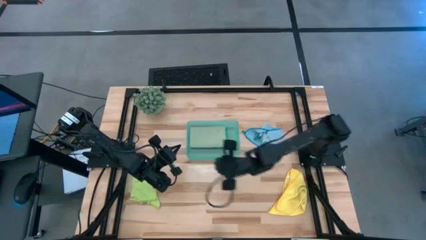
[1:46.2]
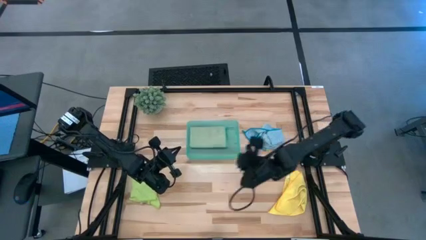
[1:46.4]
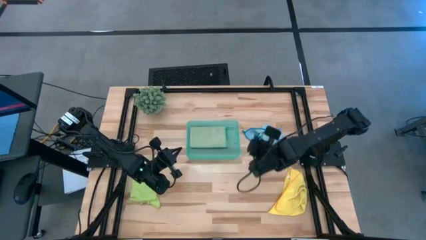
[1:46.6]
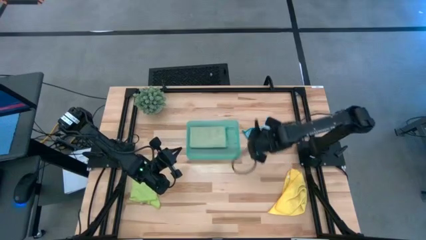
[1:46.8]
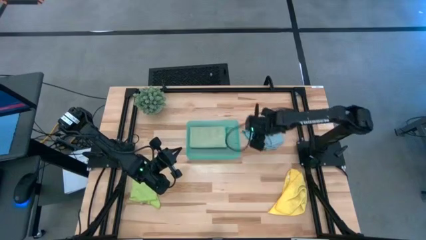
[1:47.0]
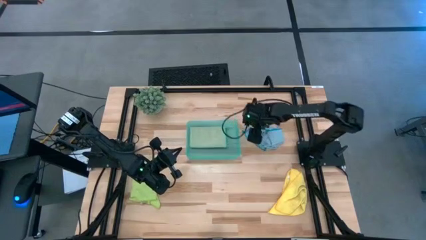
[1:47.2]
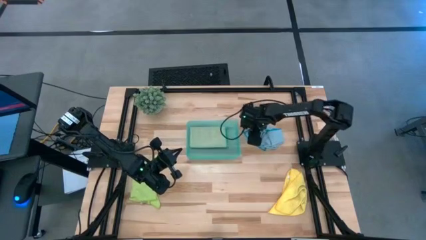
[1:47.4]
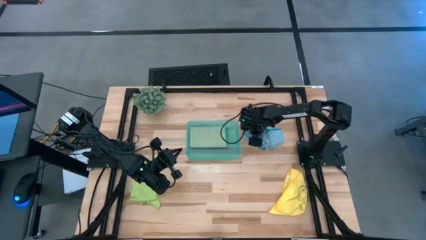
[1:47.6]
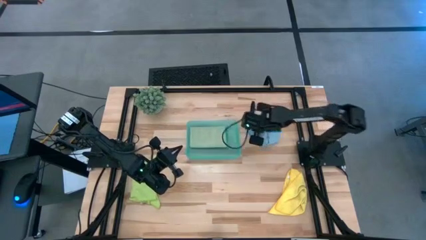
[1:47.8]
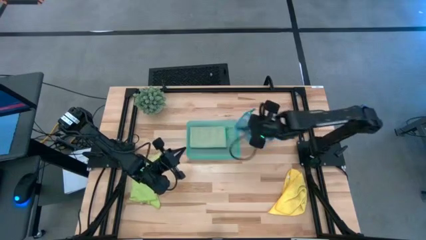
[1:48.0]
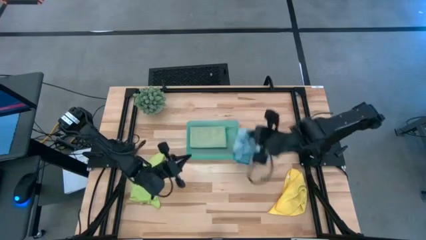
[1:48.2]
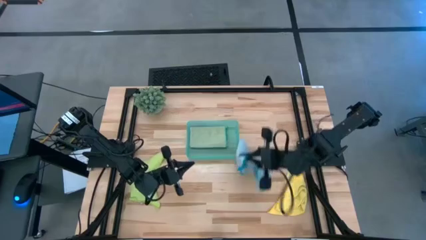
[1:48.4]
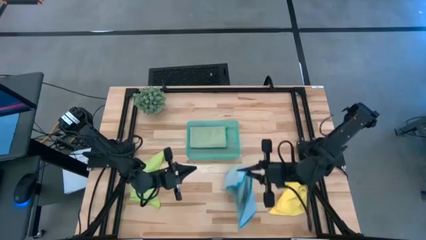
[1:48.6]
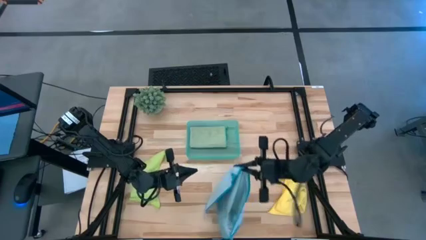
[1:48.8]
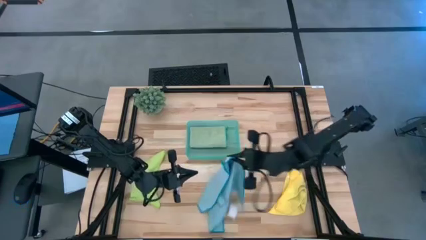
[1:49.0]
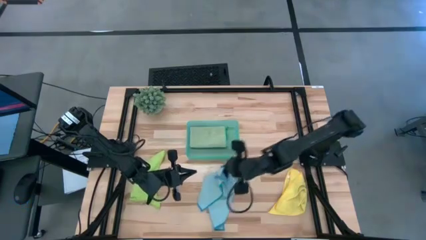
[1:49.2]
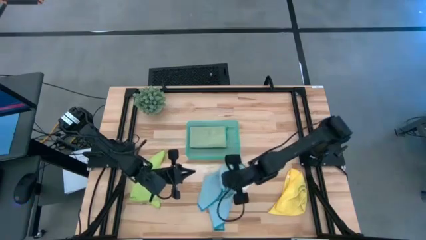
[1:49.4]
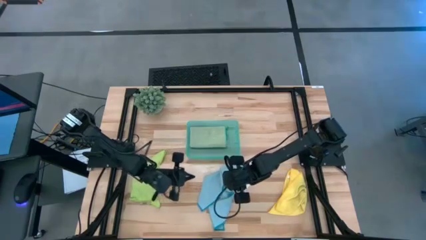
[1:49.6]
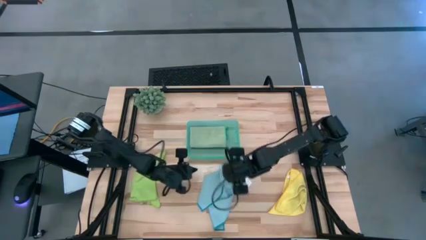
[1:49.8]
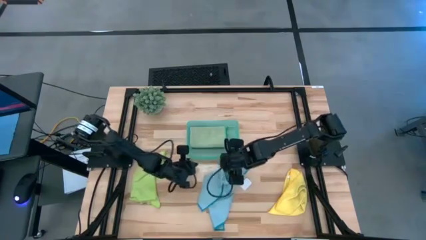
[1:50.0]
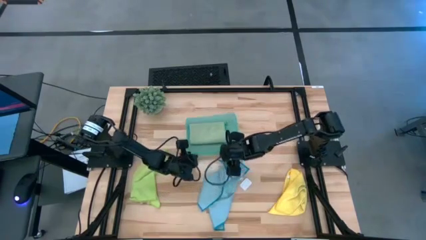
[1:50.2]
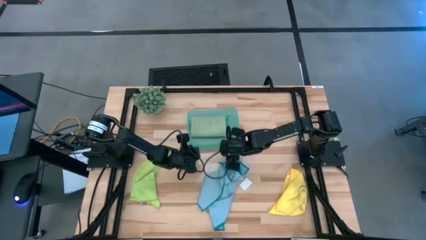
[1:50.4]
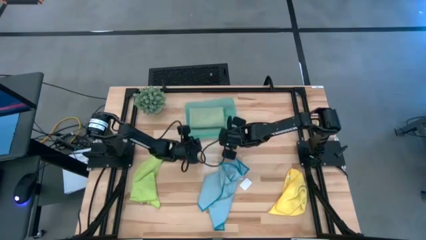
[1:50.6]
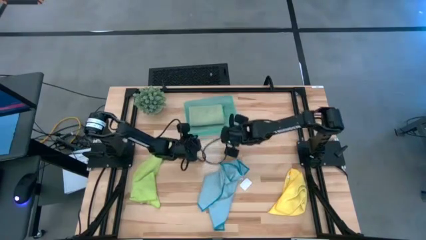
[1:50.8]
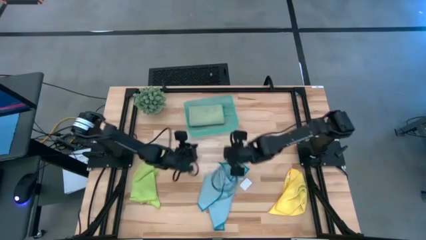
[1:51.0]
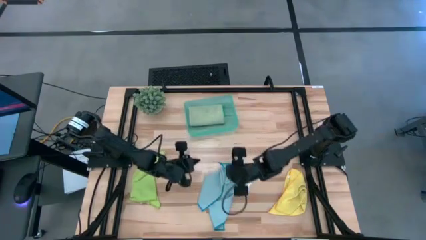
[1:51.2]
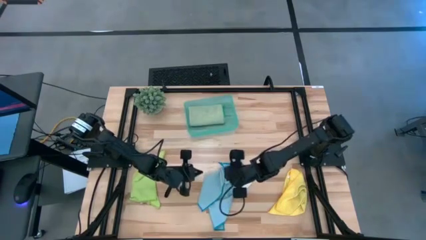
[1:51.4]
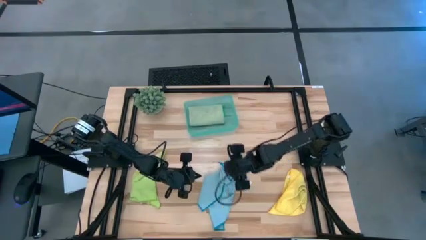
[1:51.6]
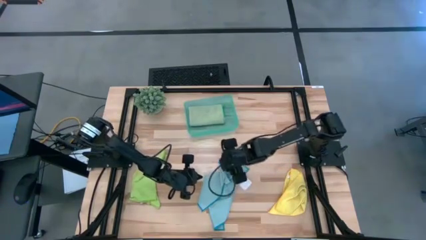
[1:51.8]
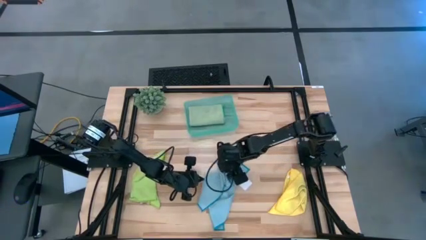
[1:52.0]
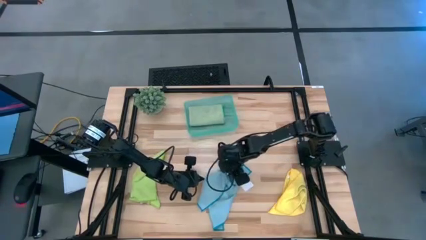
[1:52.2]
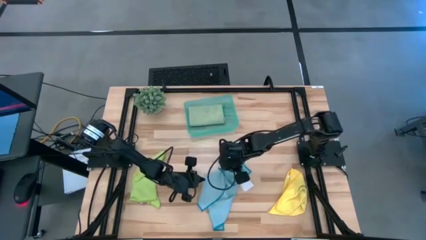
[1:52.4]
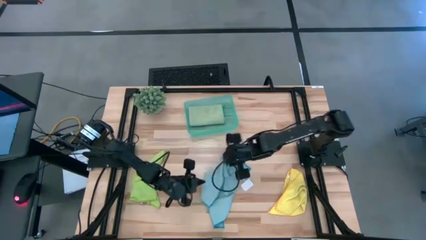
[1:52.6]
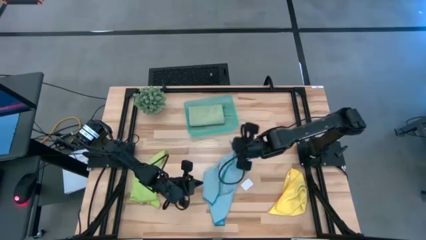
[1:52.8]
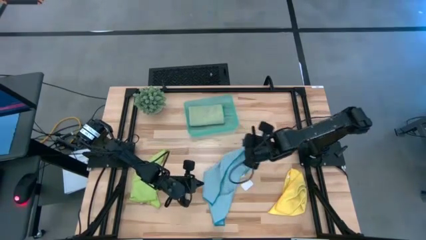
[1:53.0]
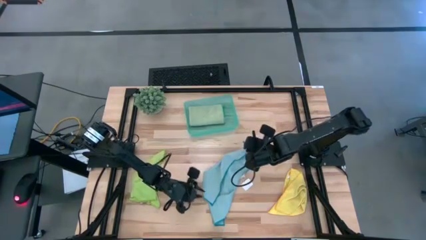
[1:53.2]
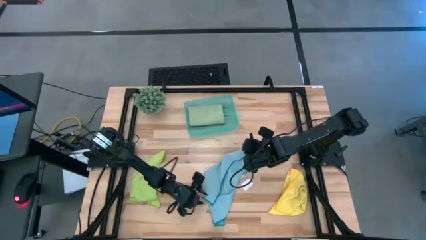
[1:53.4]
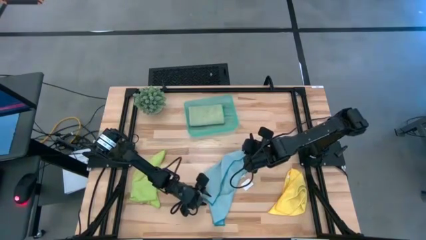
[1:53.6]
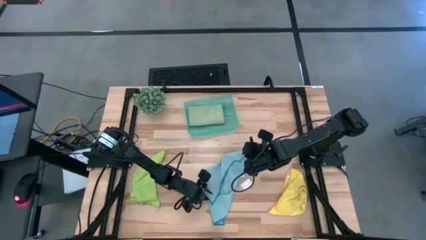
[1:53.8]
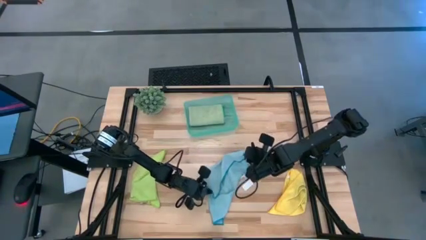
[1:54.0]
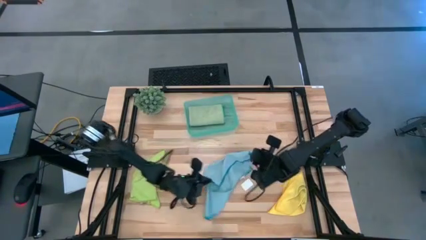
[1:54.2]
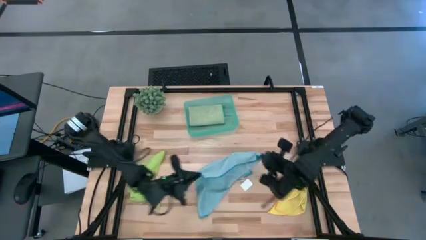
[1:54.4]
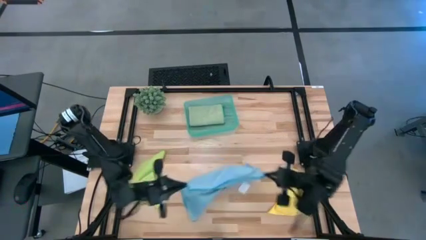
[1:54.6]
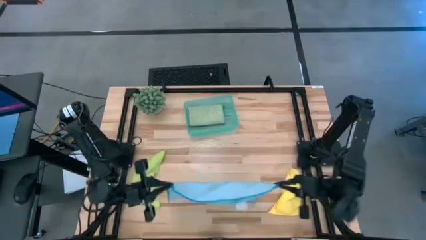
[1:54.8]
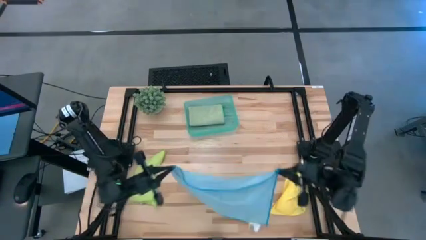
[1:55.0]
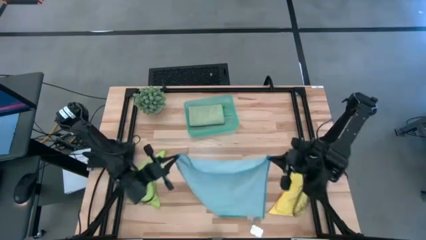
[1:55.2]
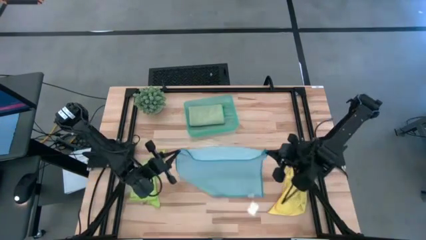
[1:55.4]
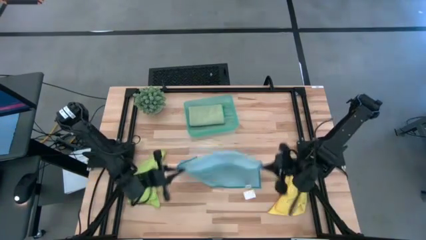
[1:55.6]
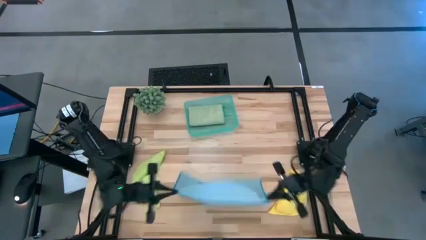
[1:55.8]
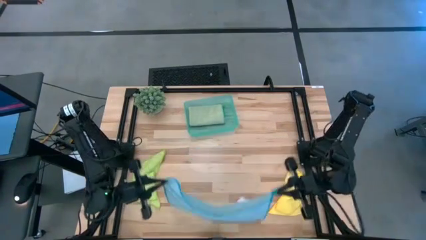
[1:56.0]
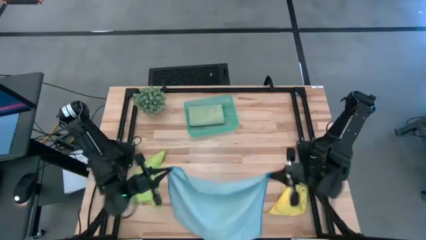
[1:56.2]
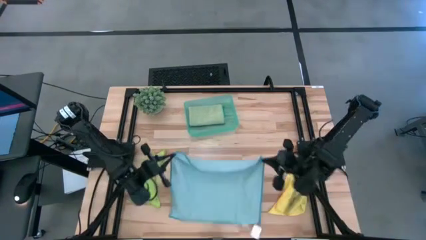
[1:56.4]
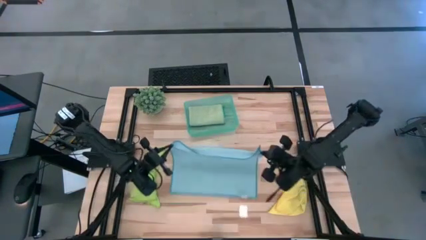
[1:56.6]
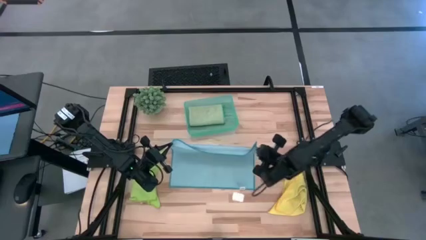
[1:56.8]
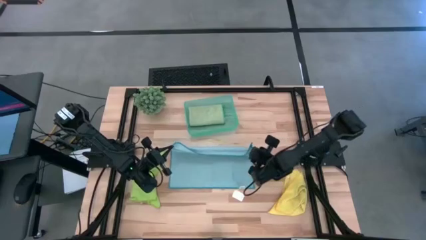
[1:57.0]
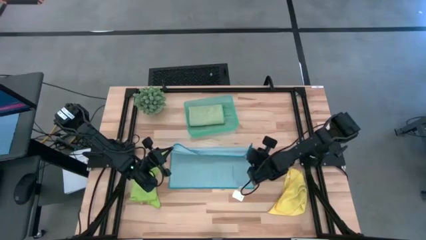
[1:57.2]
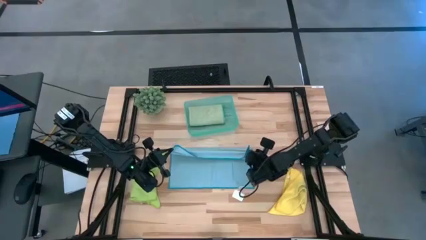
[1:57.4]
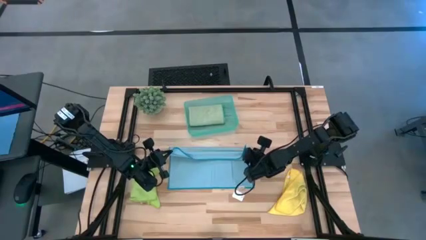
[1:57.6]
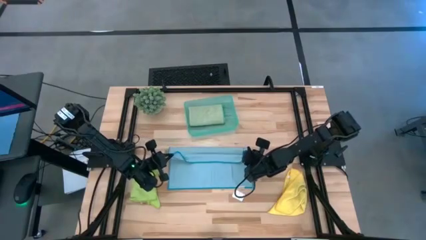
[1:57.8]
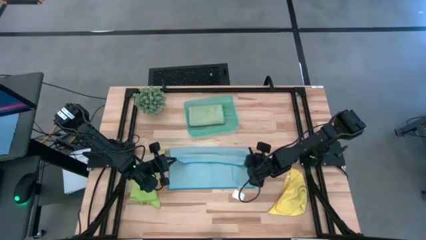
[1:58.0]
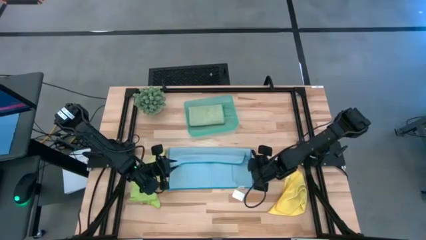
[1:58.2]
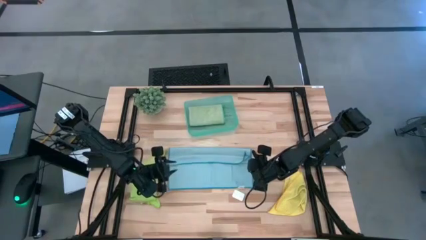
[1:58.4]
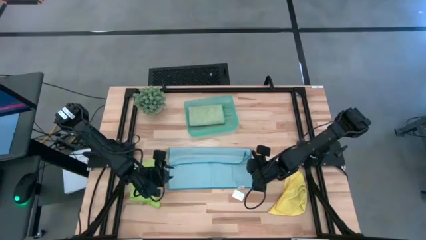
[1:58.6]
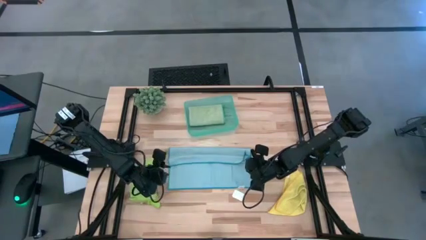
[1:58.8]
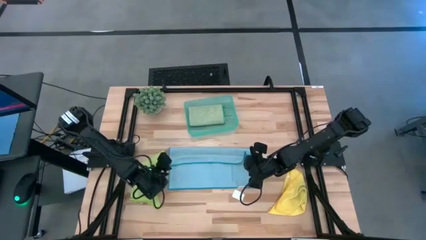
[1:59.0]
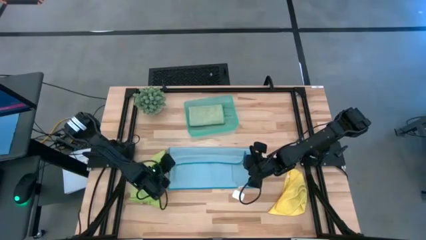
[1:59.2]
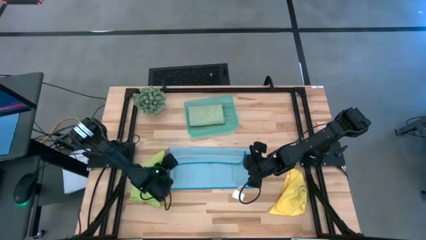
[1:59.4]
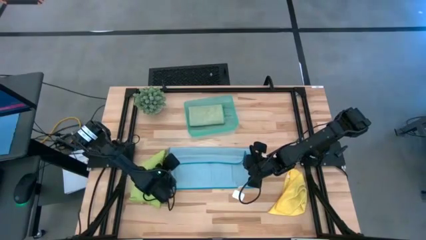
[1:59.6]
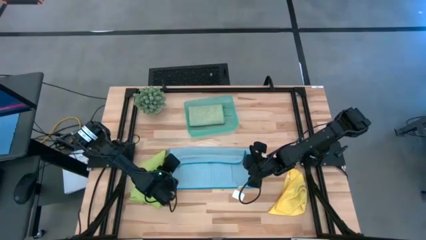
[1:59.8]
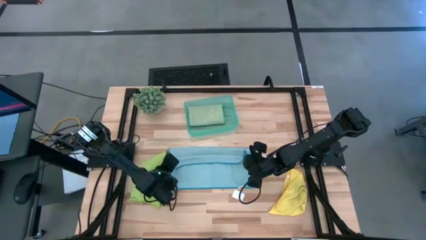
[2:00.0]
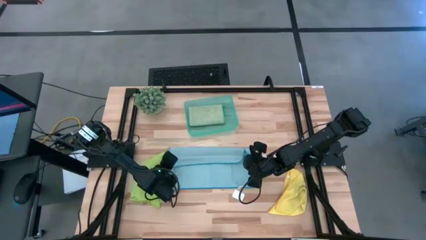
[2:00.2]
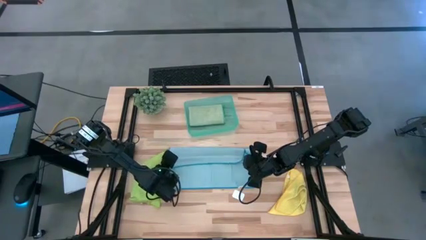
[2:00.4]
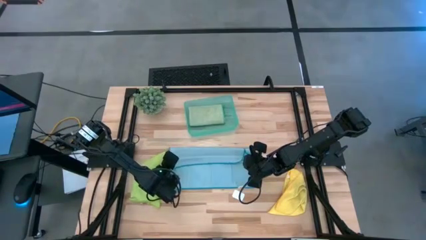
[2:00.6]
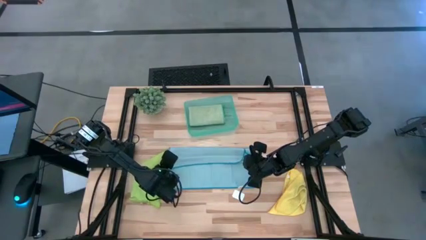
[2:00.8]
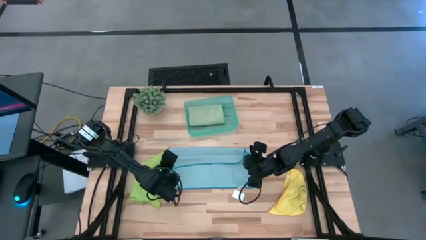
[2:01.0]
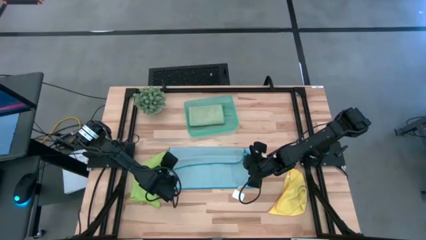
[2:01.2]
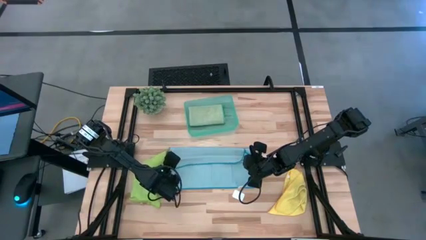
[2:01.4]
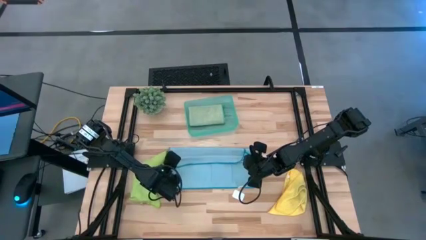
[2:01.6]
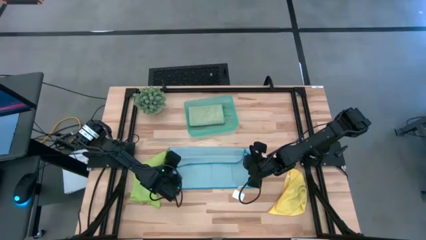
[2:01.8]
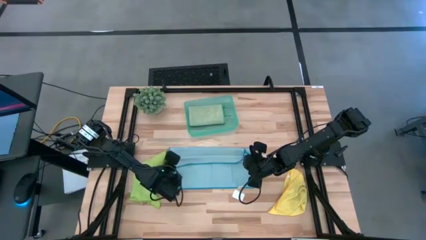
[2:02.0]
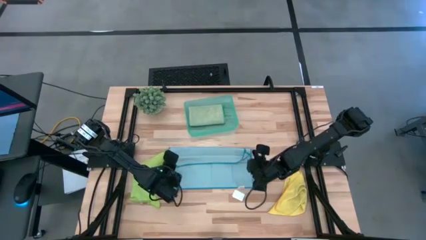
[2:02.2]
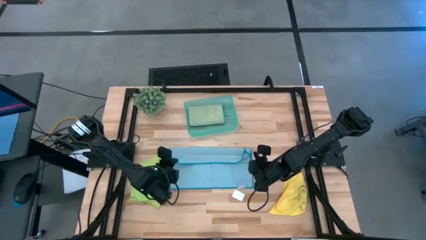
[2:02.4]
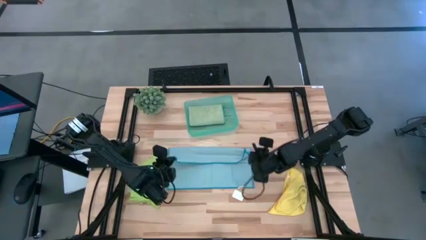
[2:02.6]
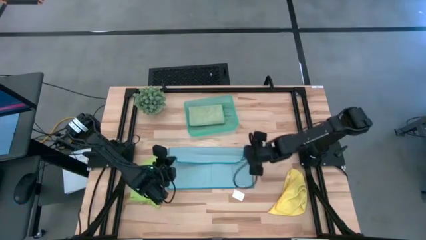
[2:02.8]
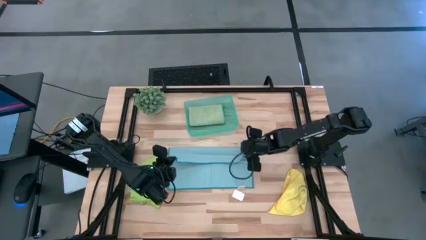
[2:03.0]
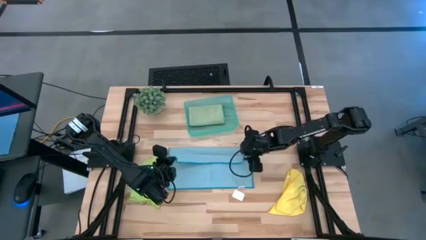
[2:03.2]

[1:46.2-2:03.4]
Task: Fold microfiber towels
Fold the blue towel
